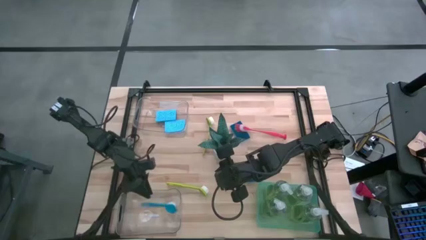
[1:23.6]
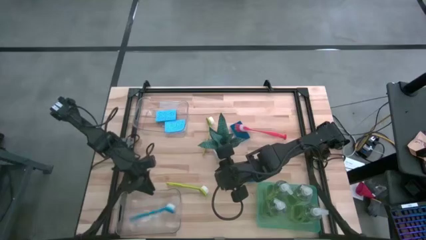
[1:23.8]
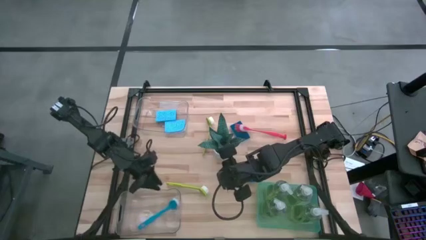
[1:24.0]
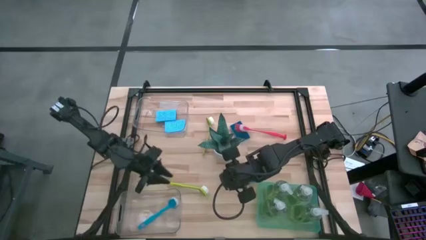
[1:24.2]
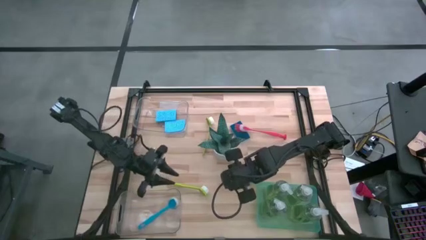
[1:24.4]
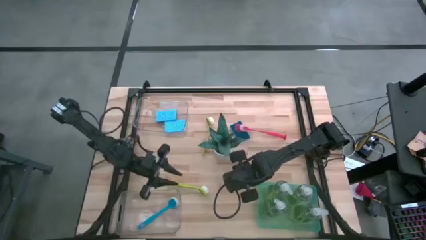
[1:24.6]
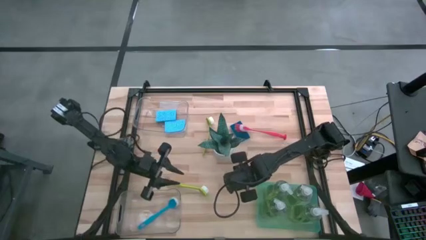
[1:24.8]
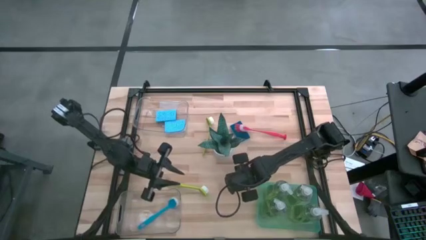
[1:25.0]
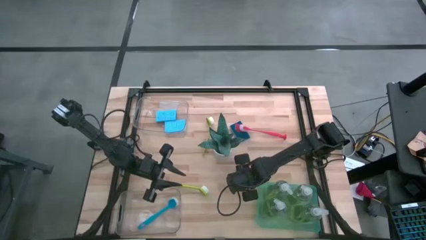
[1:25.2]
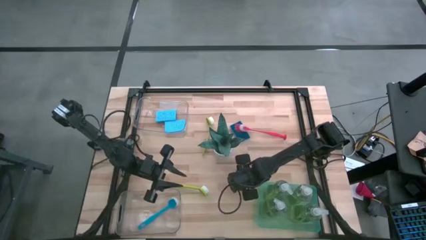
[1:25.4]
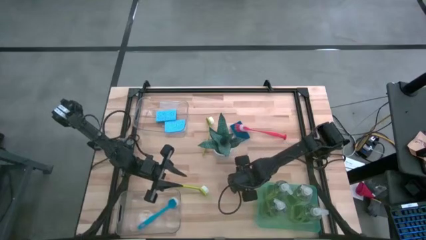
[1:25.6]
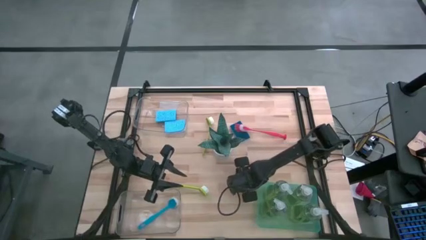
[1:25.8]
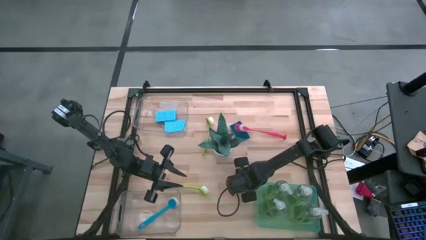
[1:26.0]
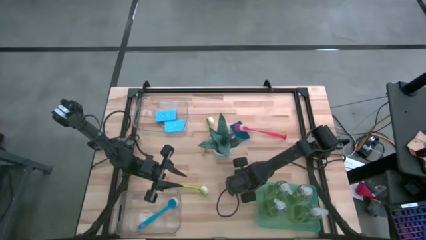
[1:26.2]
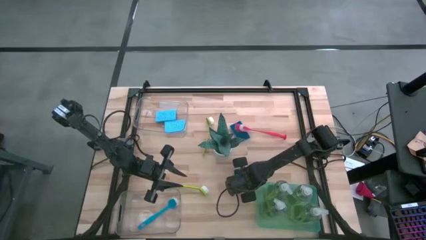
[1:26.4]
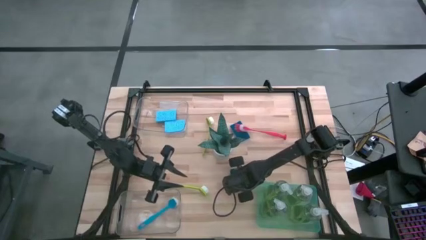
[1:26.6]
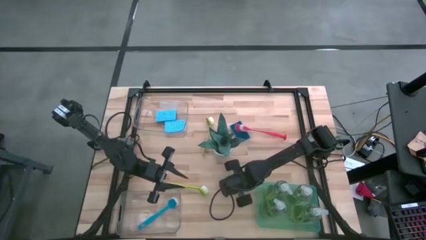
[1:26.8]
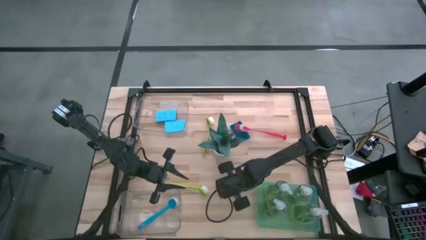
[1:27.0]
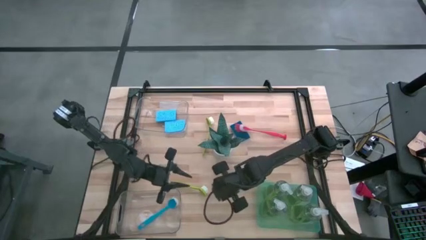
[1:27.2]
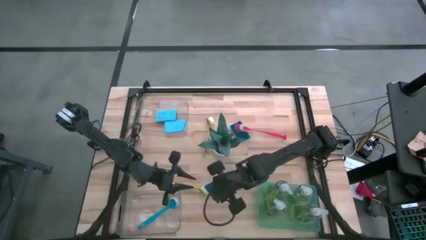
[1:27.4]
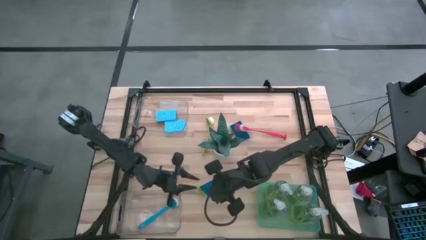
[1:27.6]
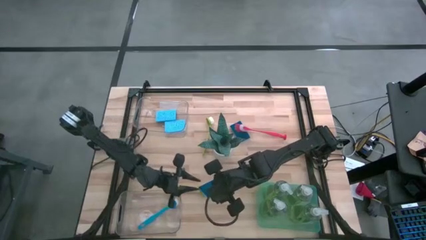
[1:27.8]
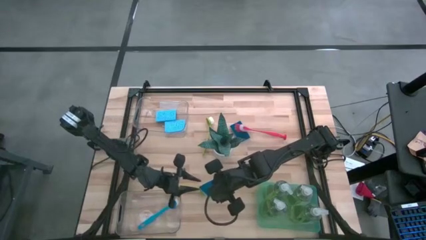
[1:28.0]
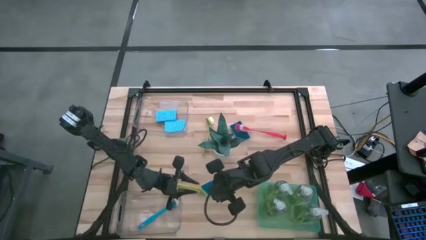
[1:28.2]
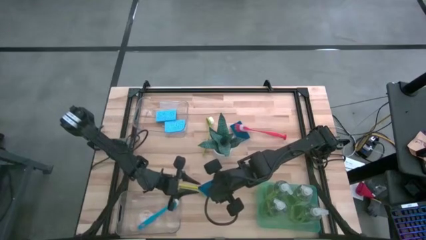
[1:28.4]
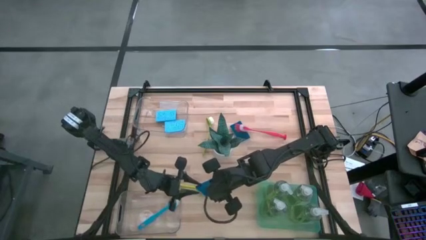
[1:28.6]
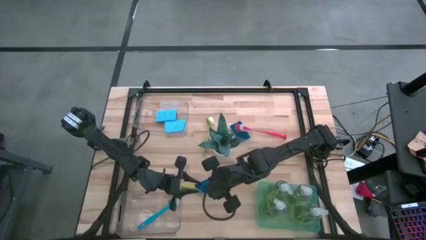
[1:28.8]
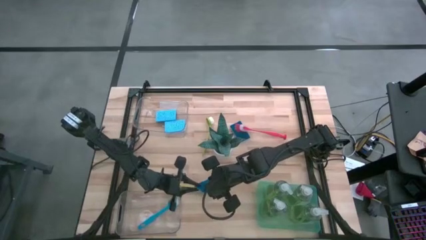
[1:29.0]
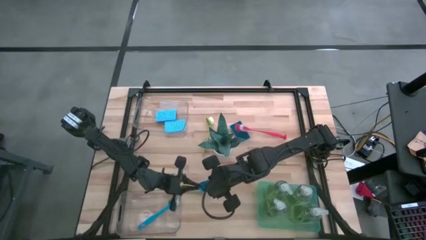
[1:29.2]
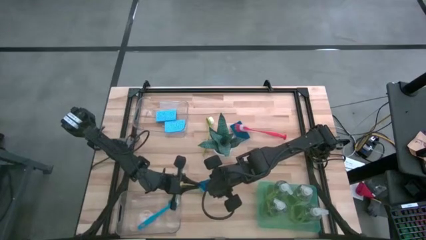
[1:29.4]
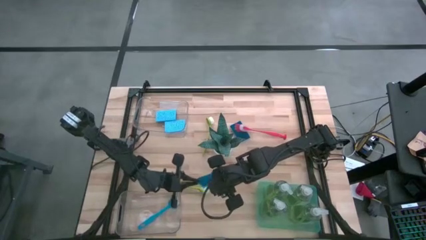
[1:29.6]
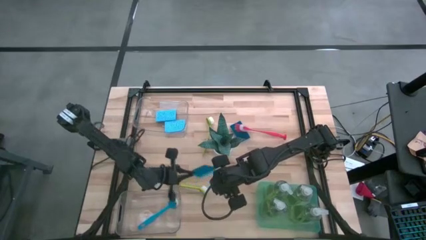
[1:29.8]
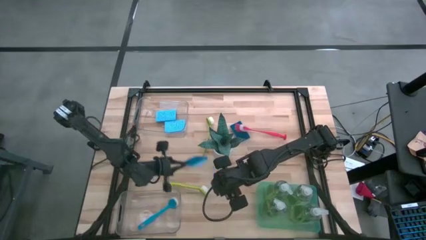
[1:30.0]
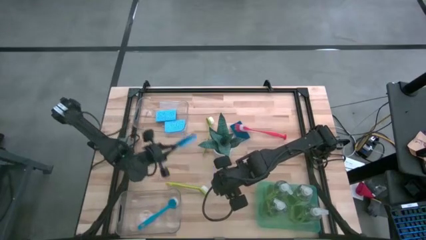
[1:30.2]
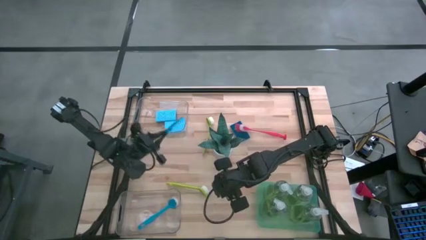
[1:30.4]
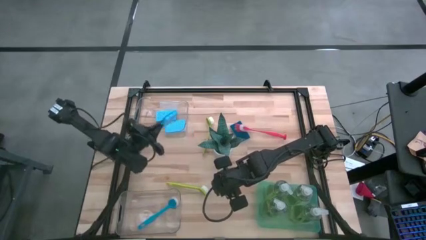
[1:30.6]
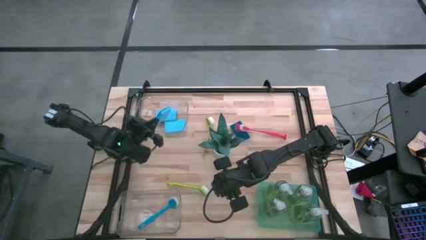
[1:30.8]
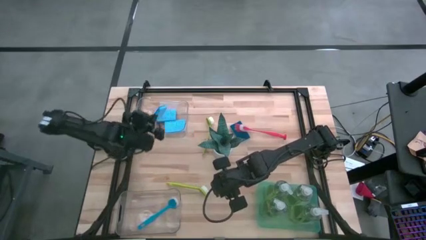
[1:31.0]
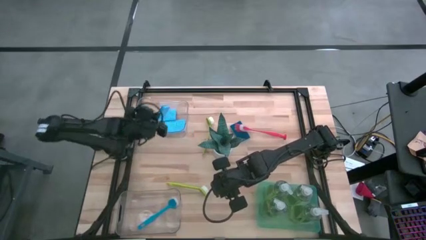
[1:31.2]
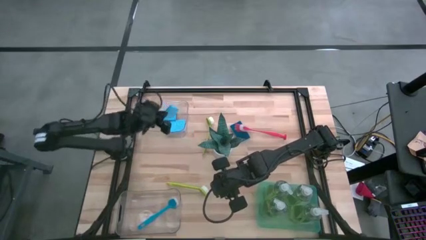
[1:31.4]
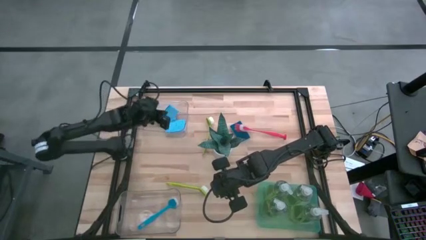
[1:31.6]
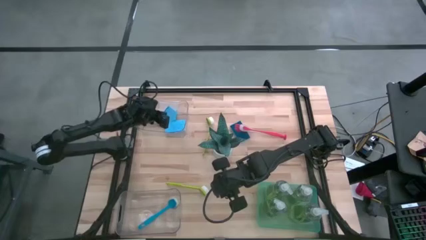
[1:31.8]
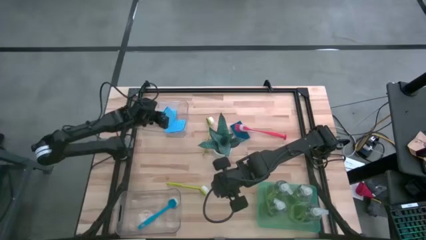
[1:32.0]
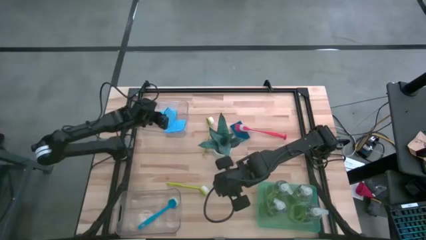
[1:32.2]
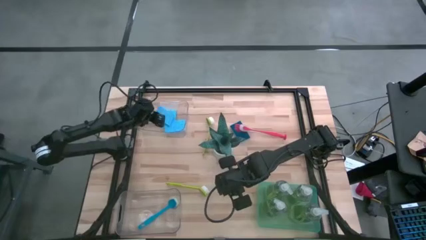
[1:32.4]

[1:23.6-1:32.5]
Task: Pick & Place Kitchen Sink Supplies
Put the blue sponge into the top transparent bin

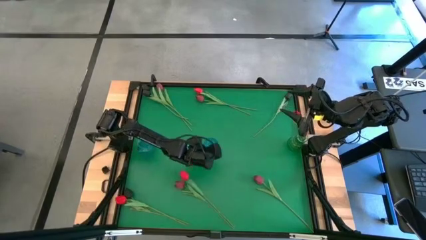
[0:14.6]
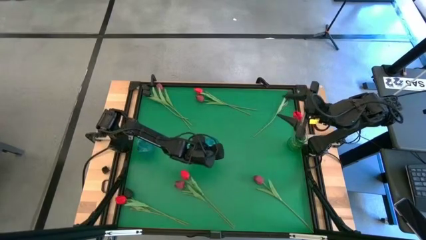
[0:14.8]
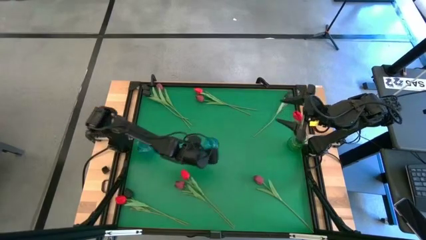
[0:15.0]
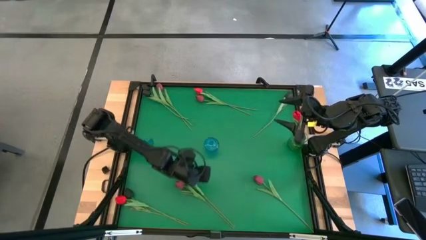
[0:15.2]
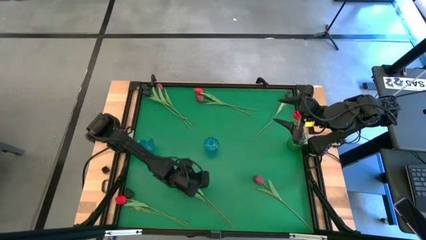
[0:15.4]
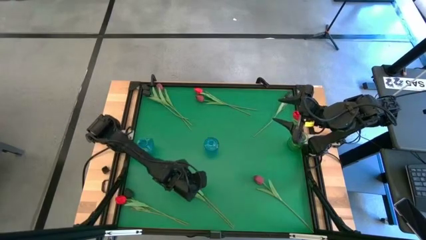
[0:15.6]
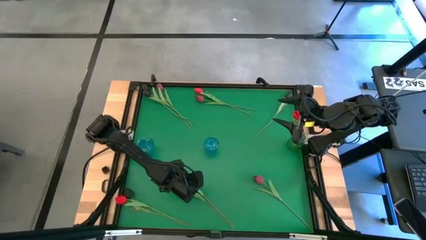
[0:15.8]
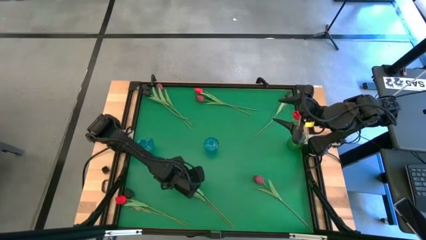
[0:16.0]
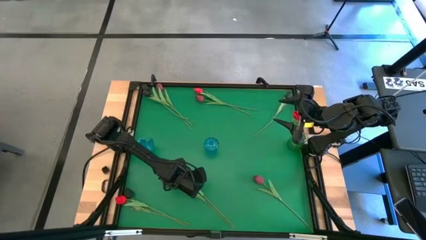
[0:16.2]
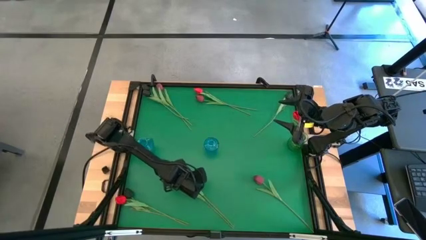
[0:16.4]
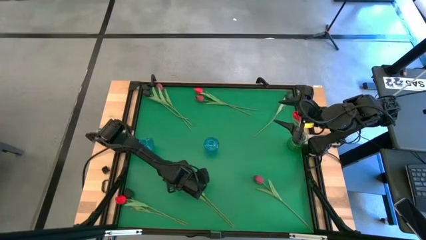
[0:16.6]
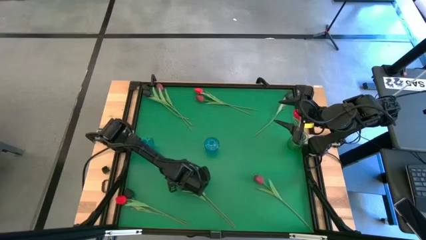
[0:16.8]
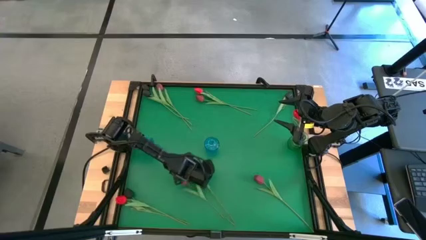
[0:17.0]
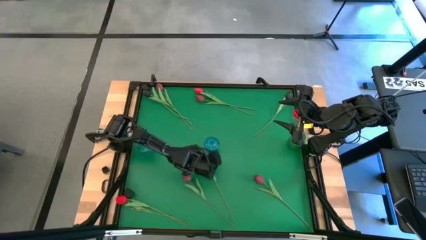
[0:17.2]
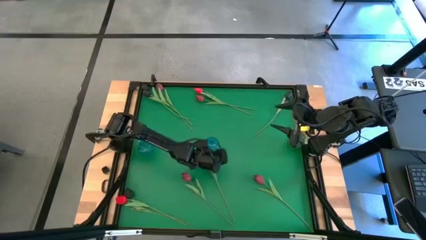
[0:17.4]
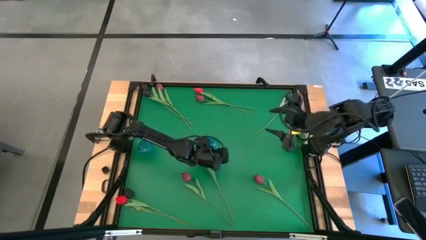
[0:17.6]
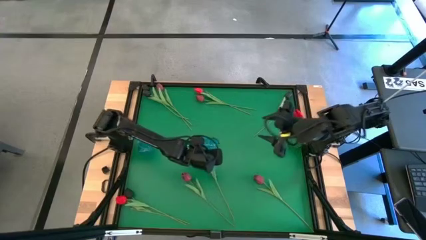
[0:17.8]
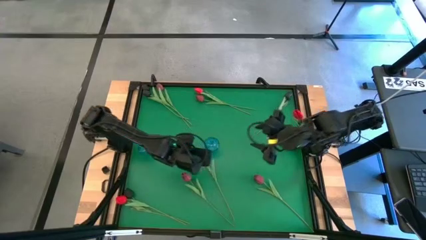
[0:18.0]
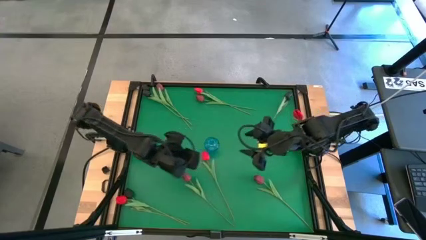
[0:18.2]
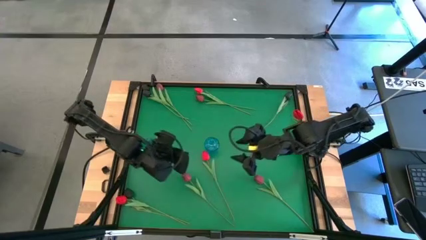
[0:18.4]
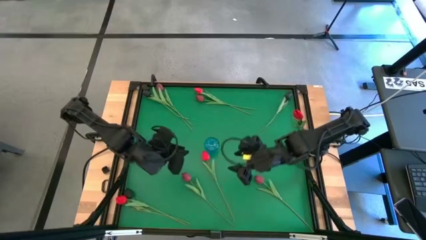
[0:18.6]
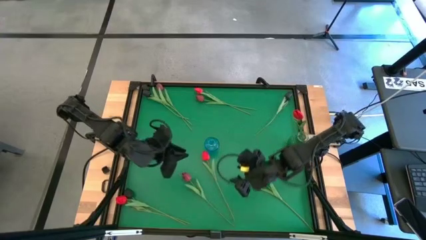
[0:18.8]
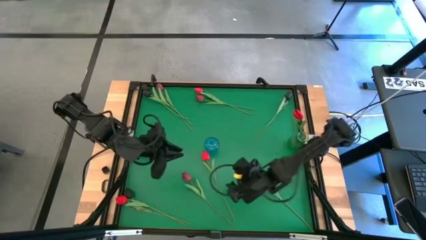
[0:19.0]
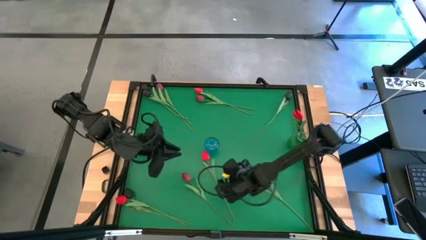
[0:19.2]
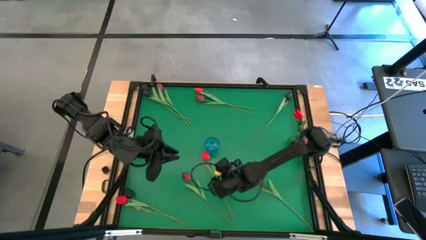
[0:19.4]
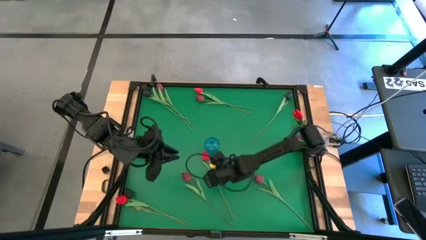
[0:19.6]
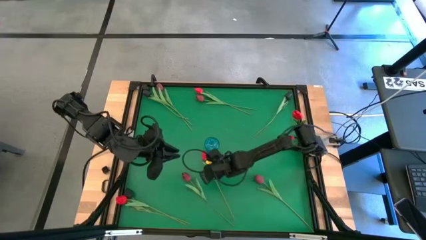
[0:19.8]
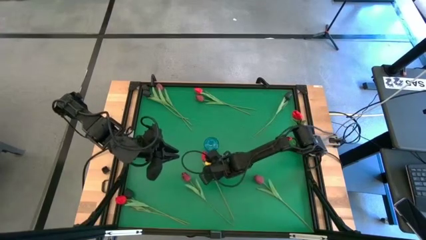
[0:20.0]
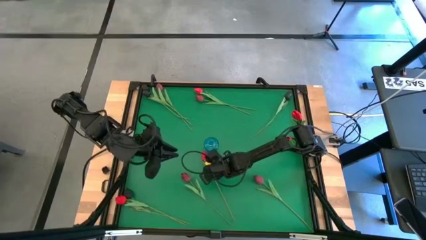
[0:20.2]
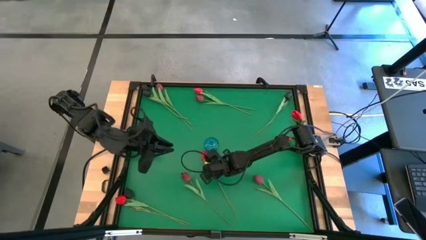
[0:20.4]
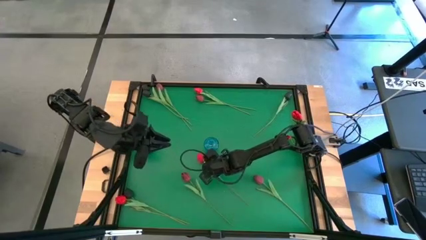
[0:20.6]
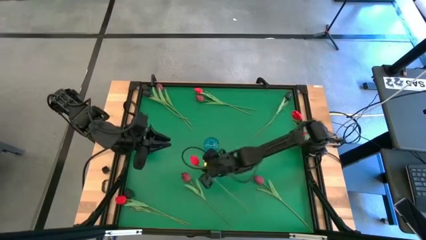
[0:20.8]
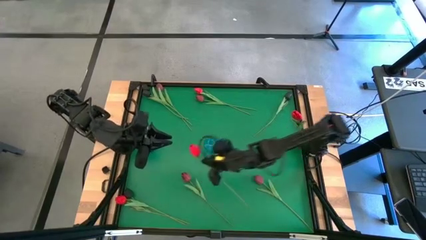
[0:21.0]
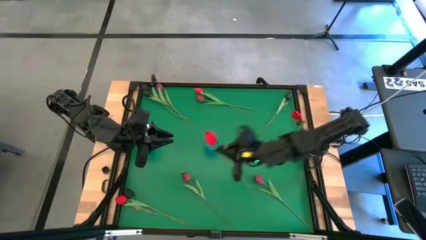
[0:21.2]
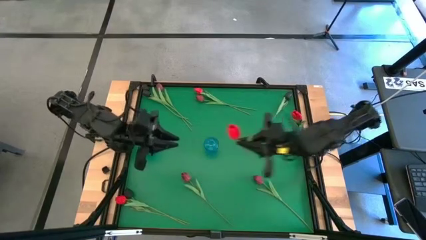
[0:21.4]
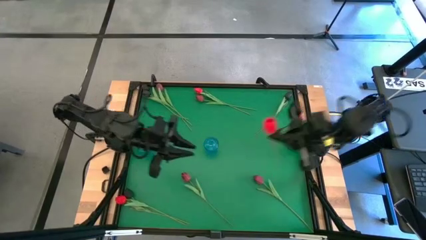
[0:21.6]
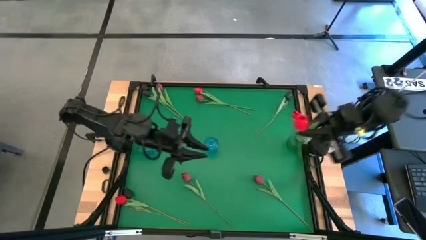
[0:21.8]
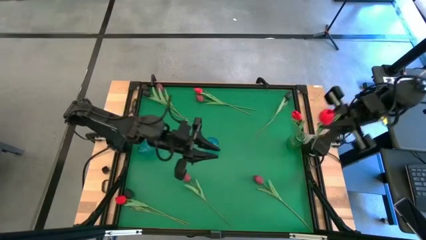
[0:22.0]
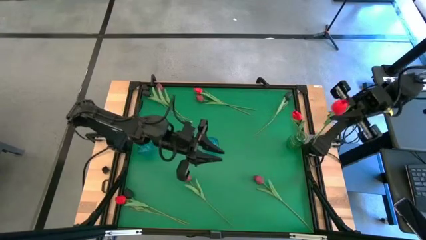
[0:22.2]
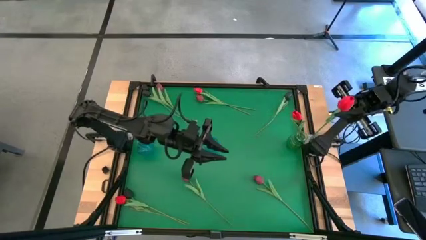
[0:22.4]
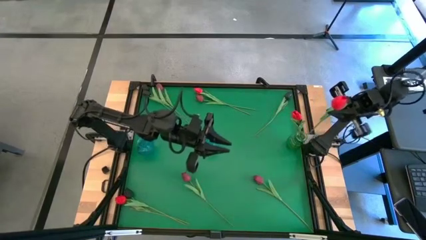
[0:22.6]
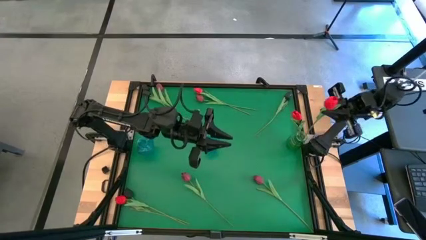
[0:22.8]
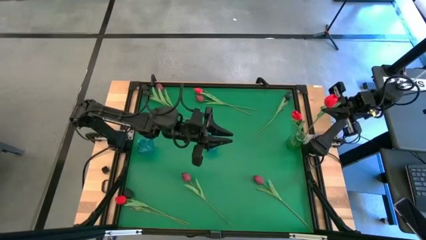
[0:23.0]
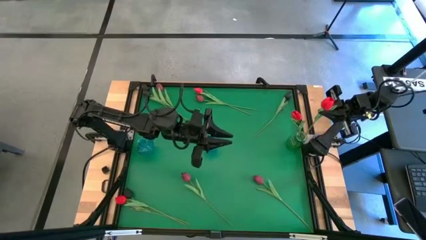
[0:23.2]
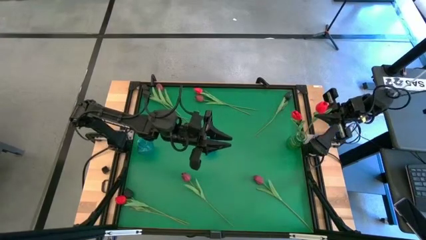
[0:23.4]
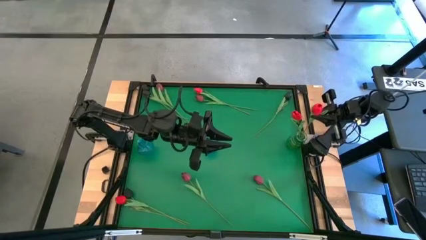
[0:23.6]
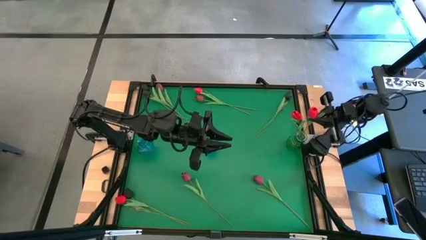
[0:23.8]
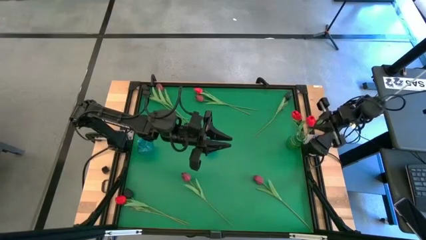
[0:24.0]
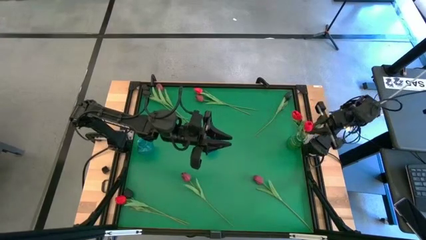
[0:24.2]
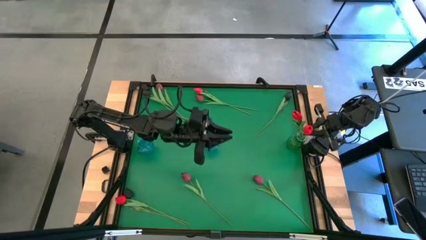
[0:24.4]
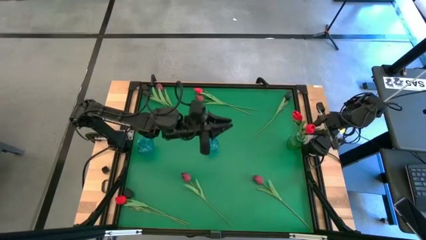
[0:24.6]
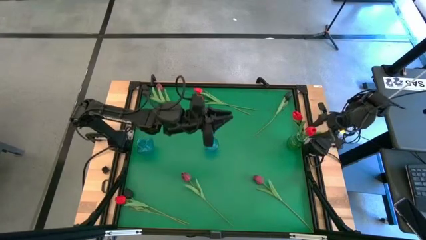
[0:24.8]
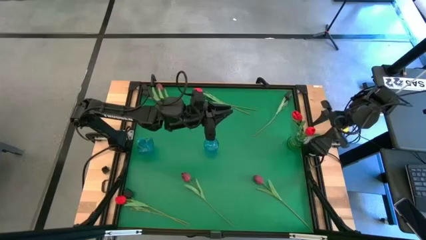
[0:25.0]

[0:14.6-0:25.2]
Task: Sort flowers into vase by color
Put the pink flower into the green flower vase
